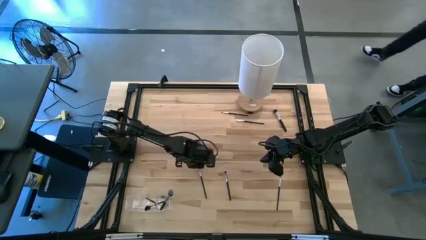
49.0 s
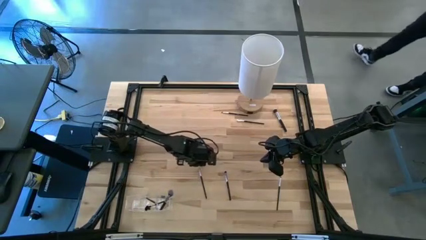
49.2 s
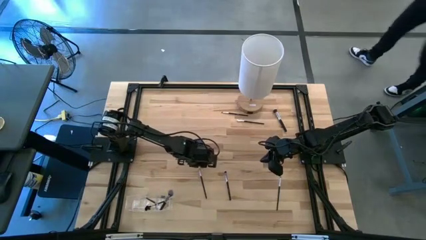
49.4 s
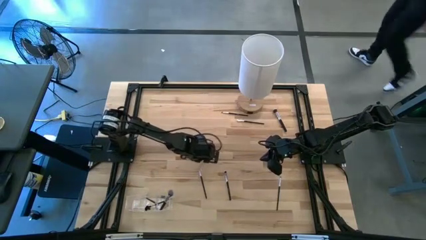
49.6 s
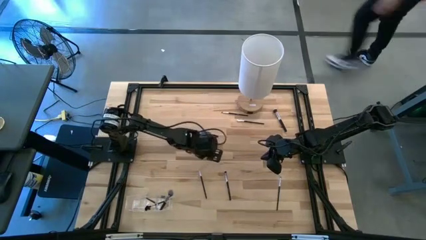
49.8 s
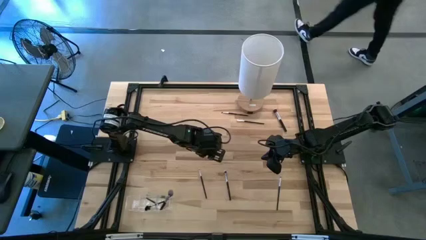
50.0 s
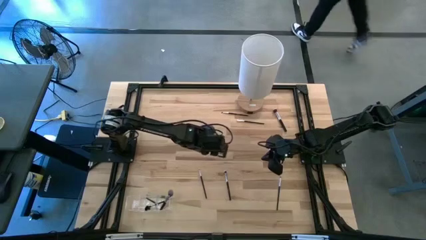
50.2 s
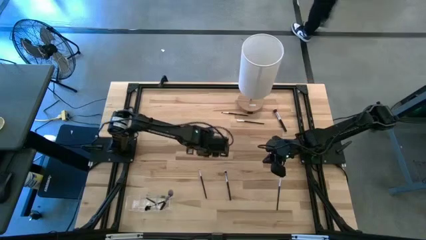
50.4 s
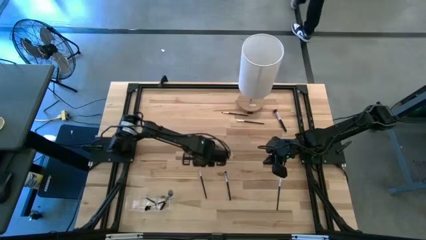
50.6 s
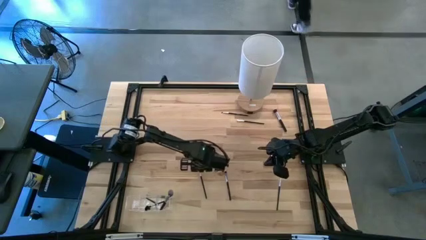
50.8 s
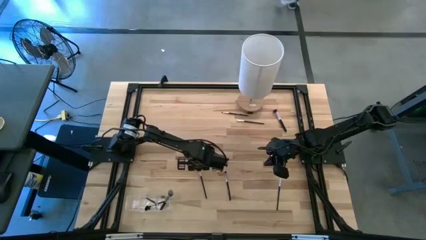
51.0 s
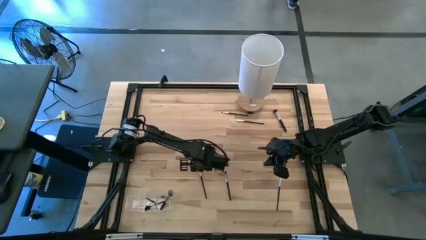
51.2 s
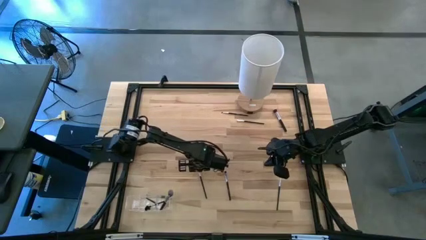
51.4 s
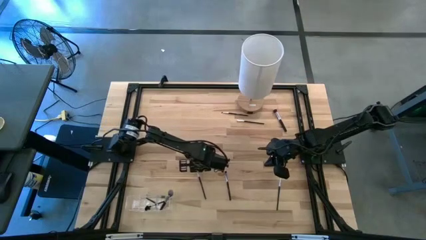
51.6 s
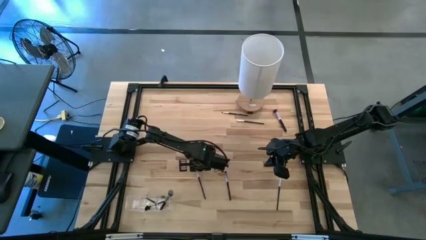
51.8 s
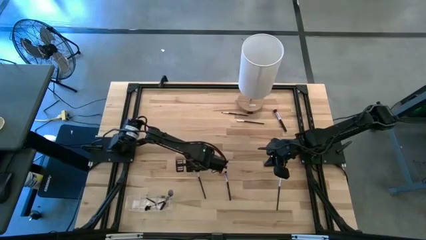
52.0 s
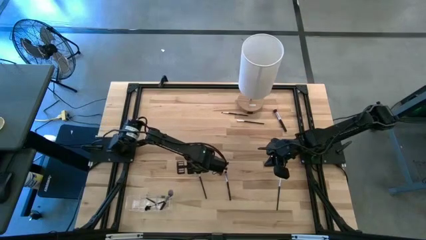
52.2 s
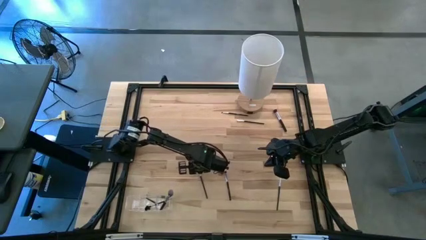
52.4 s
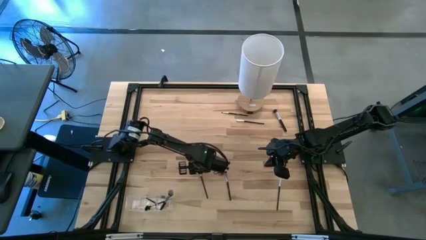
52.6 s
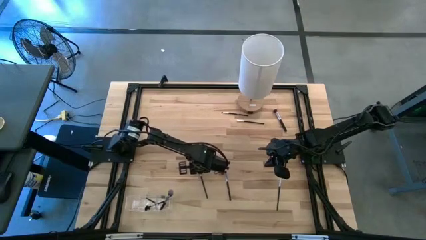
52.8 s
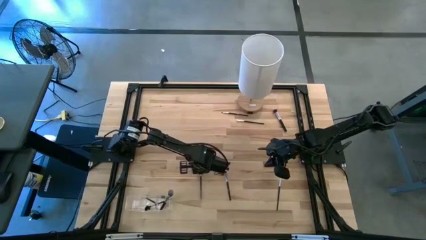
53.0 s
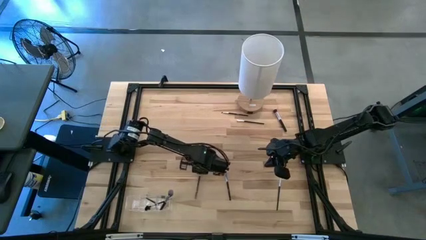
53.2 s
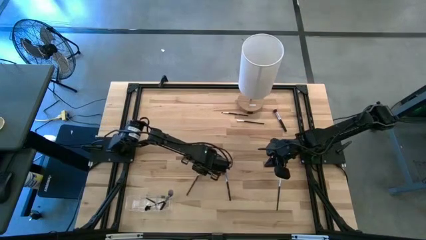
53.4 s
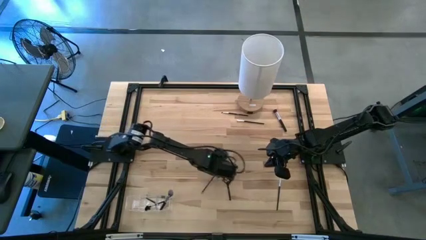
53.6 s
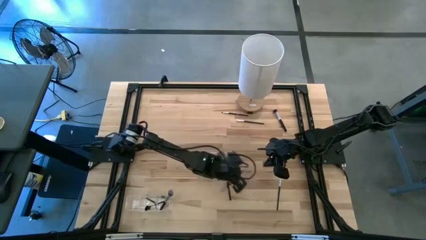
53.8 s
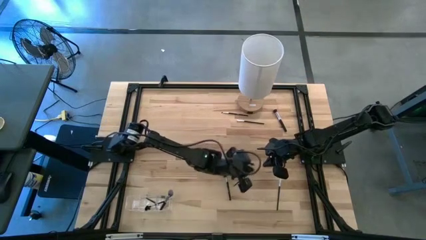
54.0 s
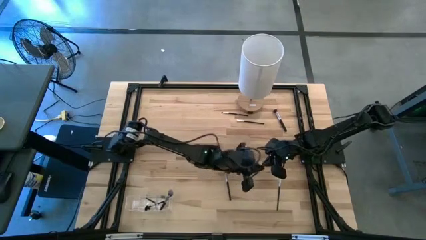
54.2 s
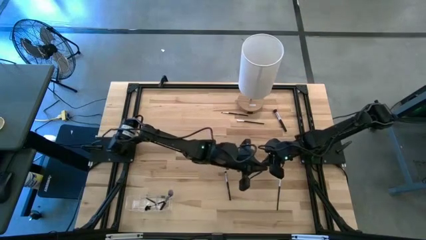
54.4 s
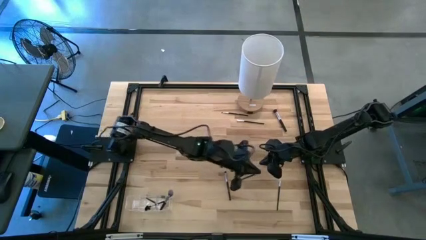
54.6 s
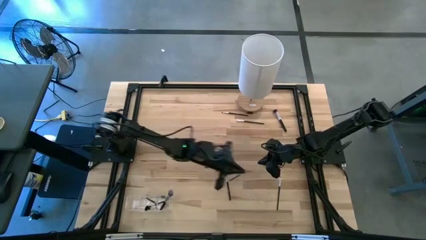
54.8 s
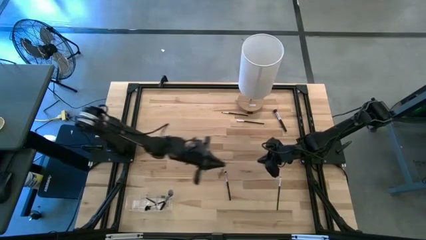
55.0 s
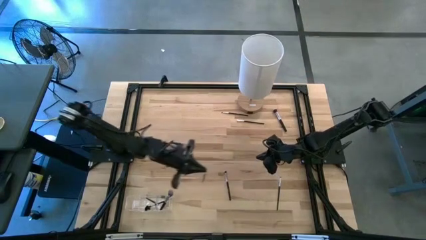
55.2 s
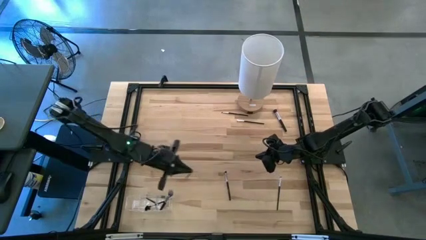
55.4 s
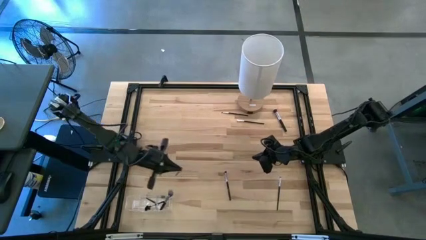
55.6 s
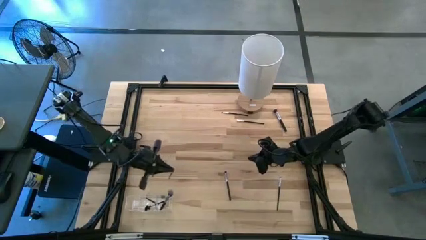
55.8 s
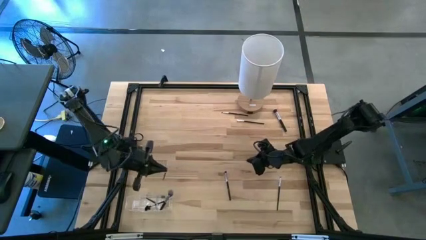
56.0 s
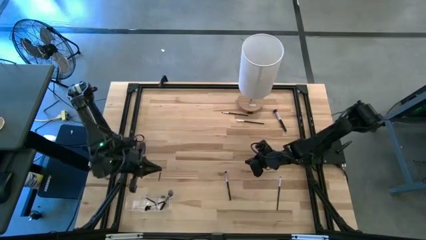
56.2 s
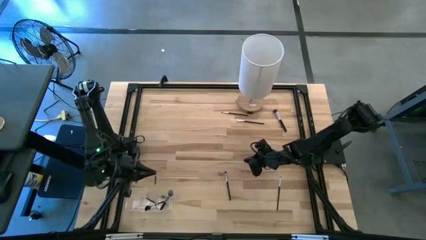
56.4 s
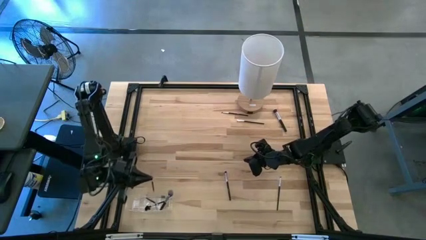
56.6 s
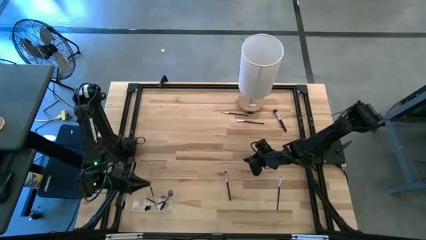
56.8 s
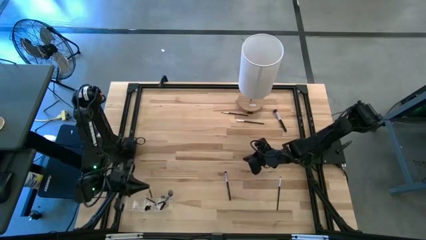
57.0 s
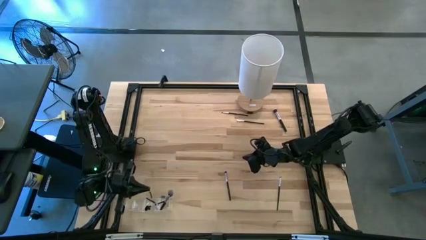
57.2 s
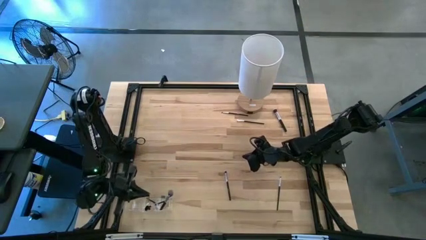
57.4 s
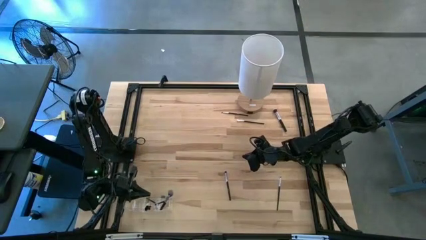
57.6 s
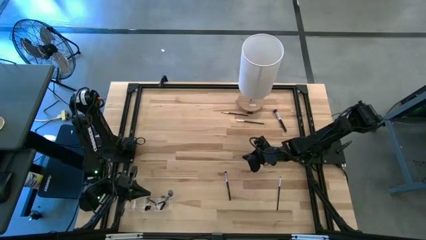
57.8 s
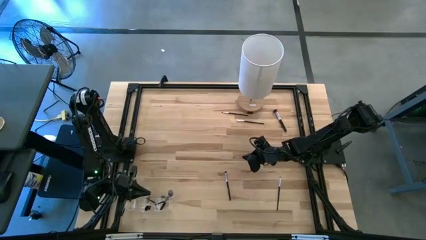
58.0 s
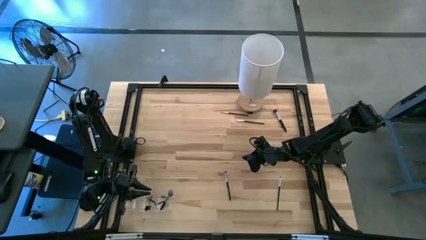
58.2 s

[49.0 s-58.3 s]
Task: Put items in baskets/containers
Put the eyeshadow brush into the transparent organizer

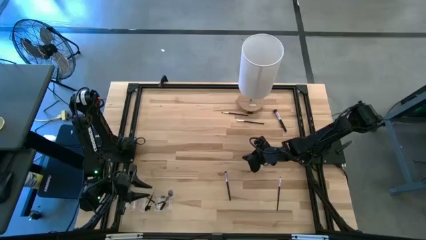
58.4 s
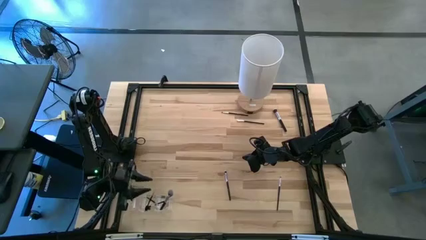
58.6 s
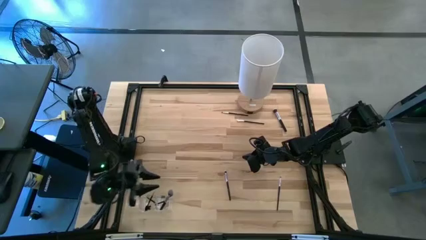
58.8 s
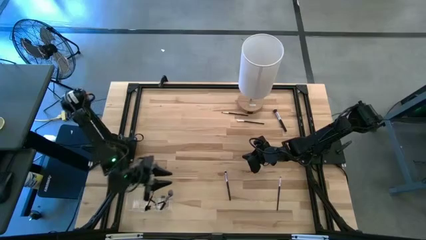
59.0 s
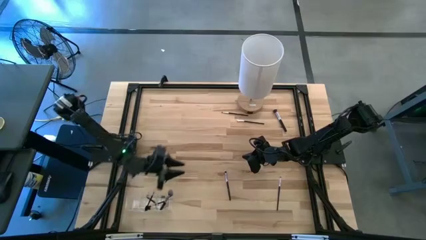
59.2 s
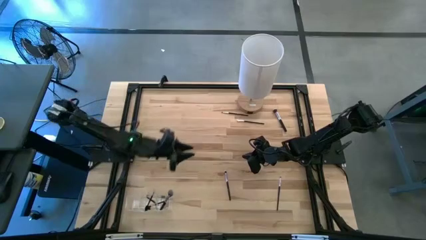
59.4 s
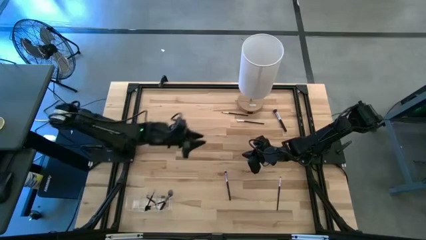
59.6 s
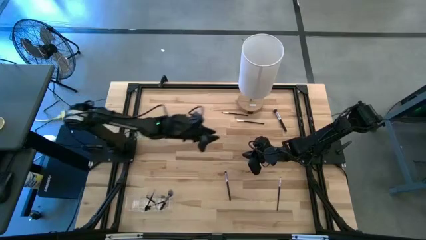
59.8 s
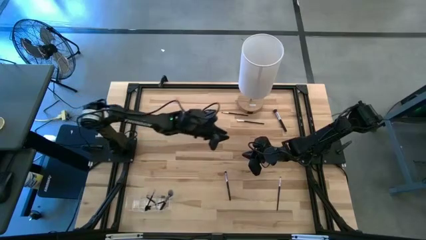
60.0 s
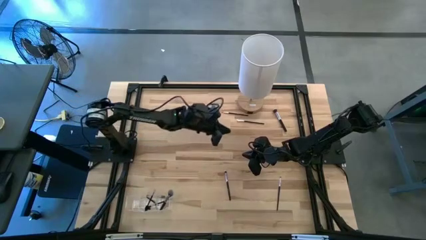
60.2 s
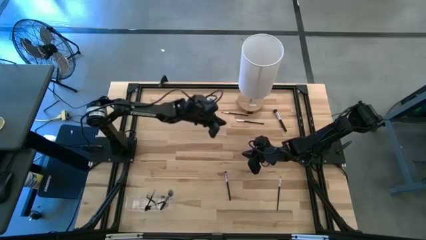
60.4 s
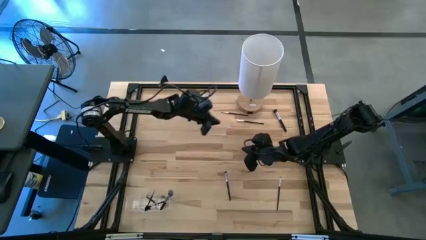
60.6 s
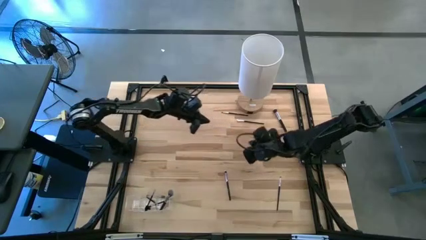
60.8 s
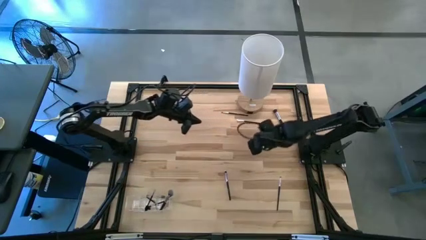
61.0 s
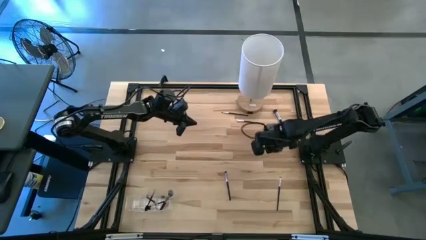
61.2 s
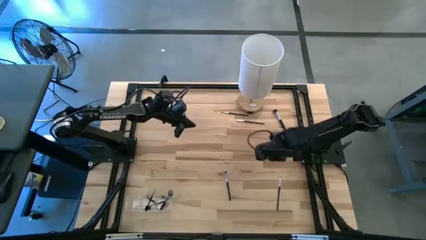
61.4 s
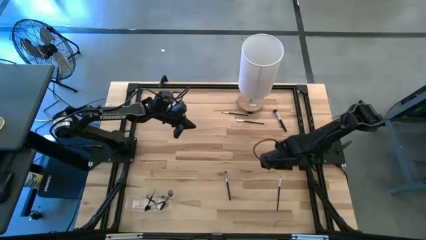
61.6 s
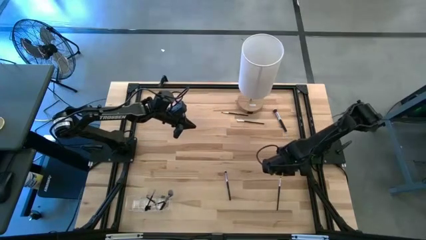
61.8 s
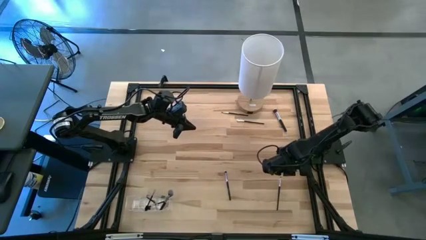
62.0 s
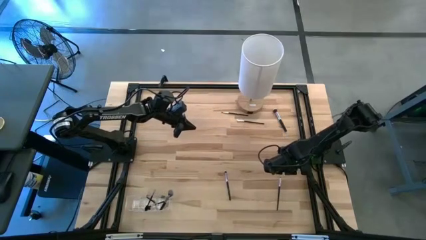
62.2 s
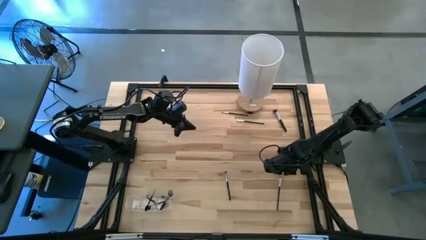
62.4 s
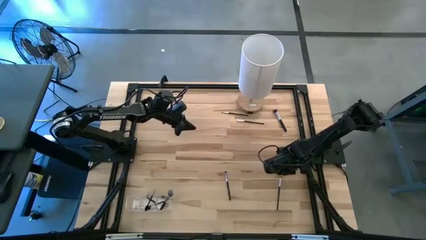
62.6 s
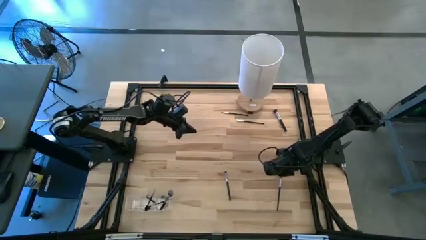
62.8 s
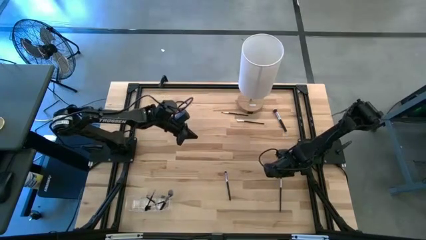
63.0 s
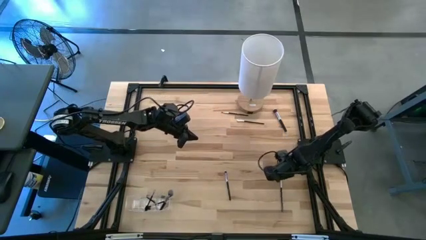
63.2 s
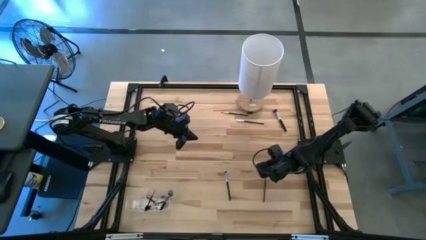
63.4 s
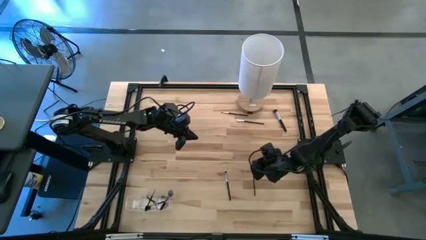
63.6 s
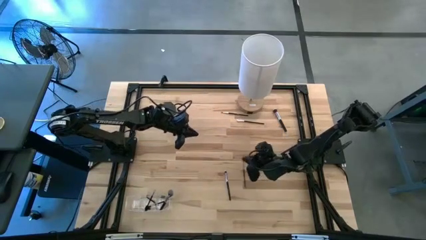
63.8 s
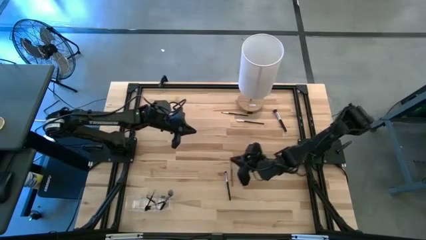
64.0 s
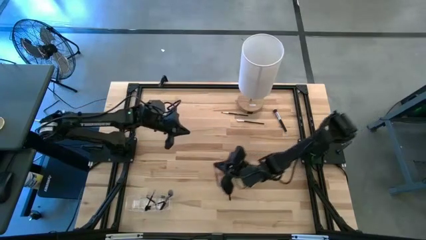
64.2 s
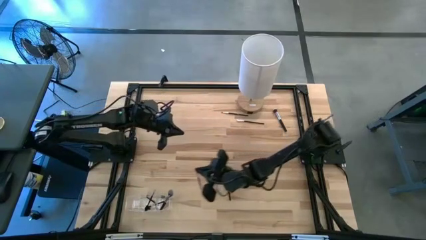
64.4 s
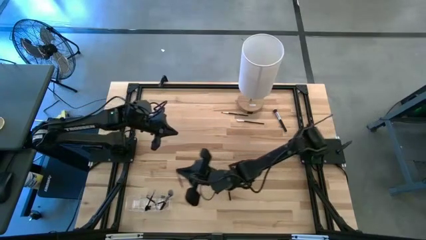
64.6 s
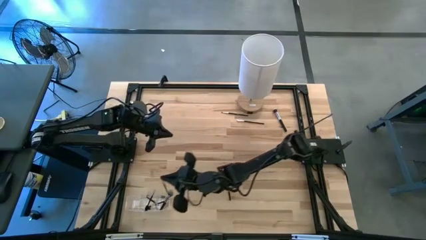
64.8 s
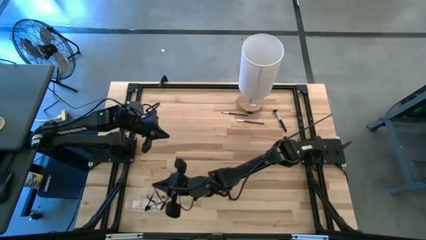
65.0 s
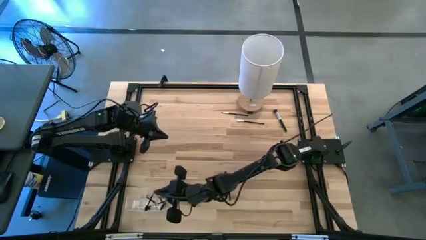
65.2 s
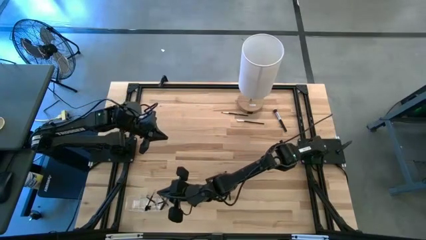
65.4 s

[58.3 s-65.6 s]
Put the eyeshadow brush into the transparent organizer
